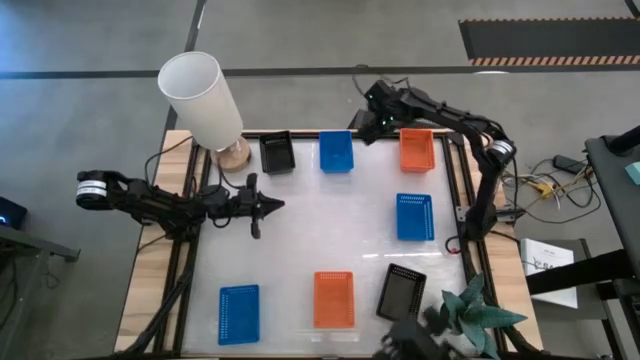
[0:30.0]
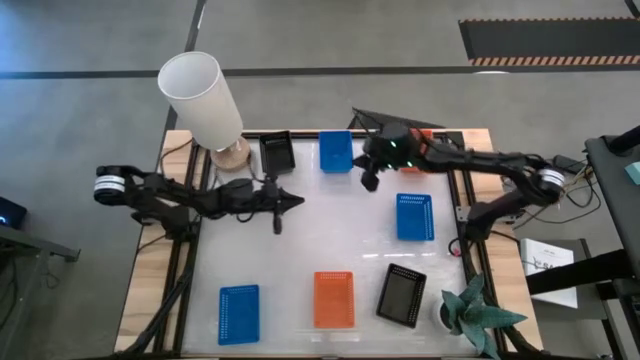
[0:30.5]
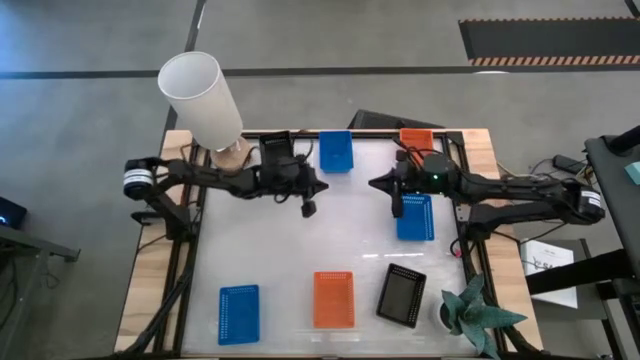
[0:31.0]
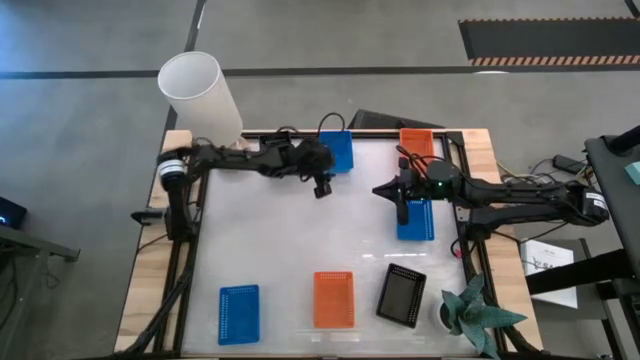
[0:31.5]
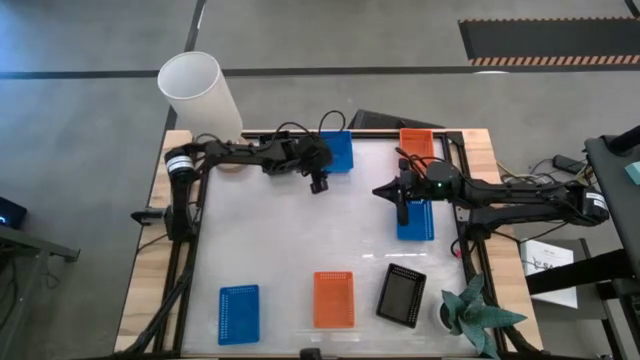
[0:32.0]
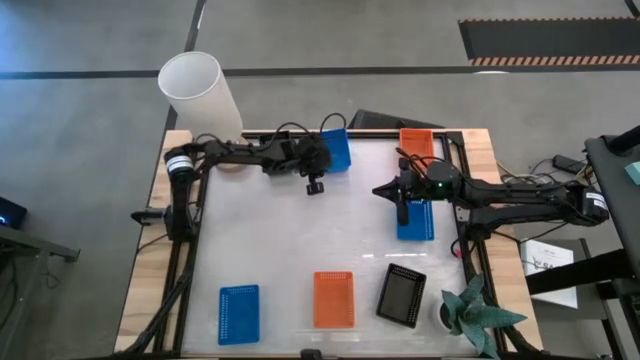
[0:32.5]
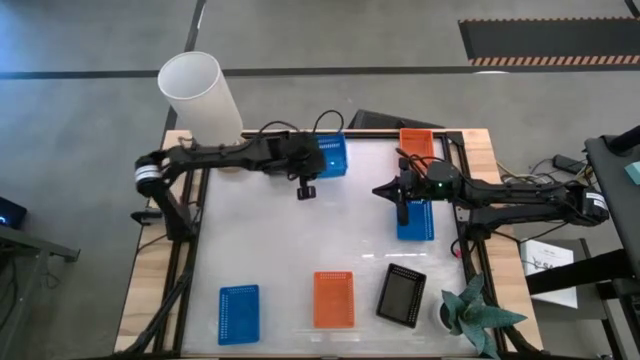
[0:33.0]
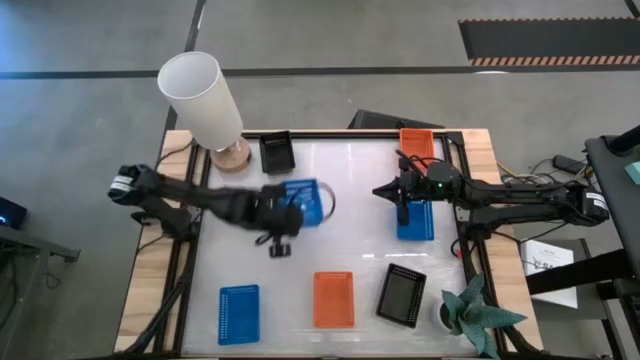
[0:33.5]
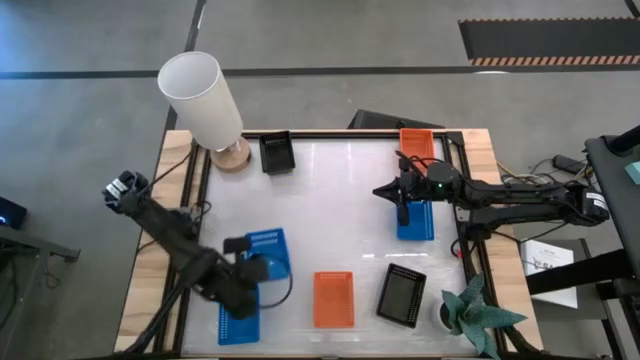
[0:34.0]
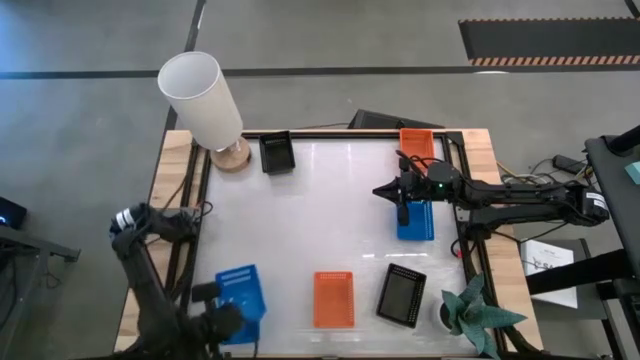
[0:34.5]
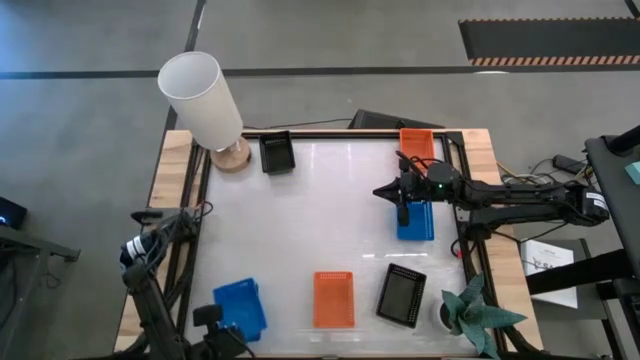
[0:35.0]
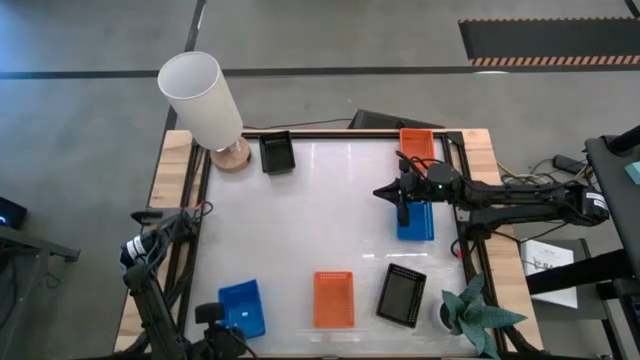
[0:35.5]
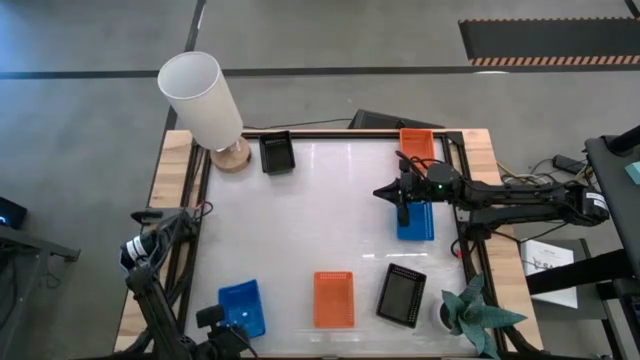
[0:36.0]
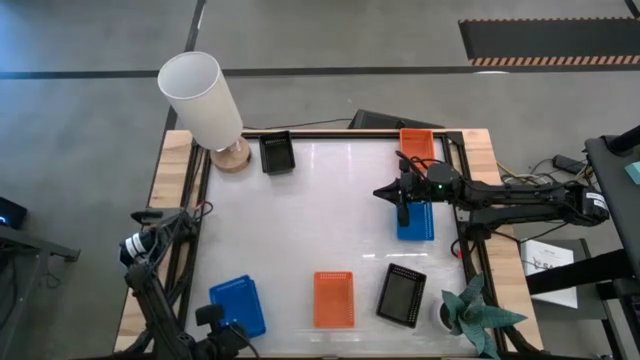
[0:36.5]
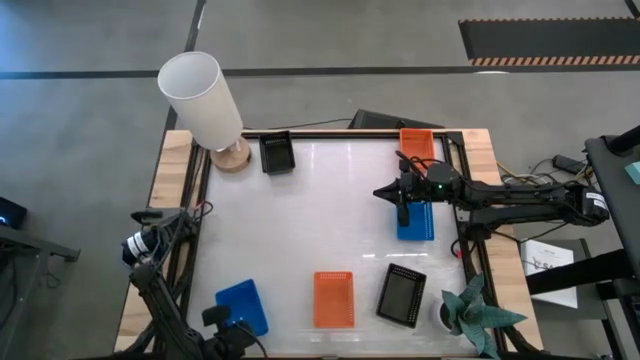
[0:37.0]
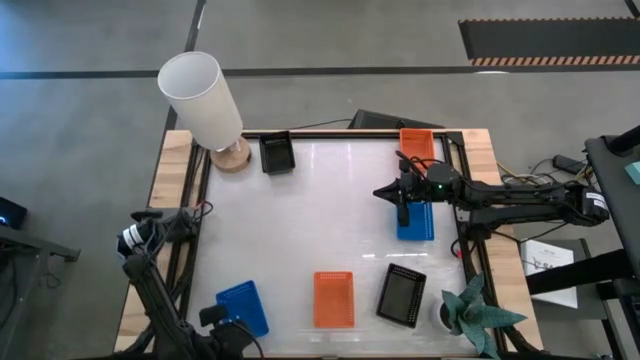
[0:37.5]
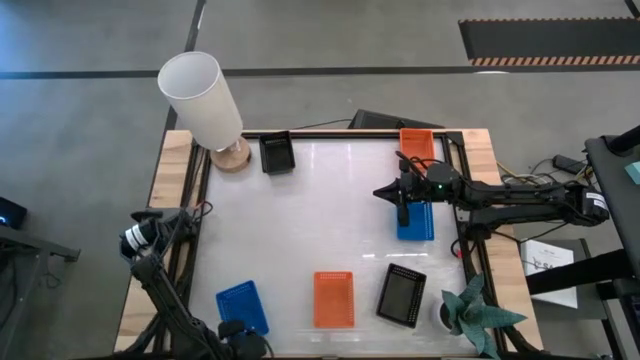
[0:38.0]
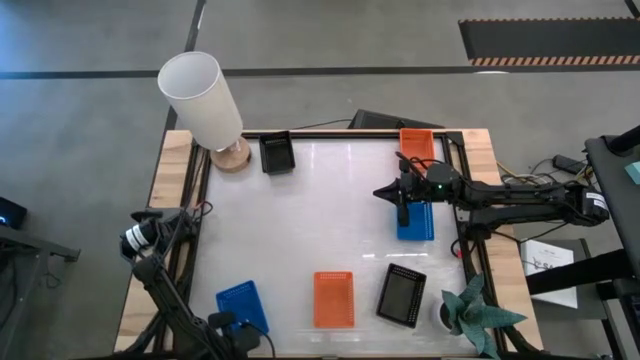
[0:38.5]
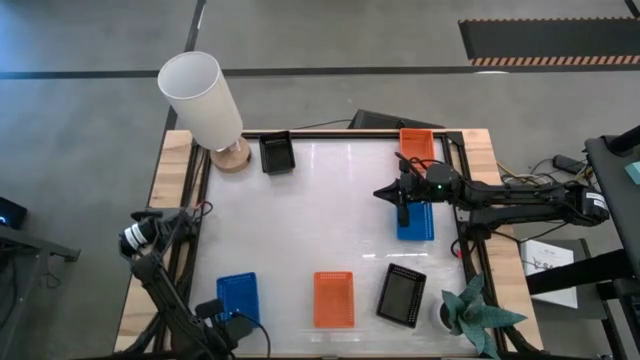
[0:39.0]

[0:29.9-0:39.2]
Stack the top blue bin on top of the bottom left blue bin

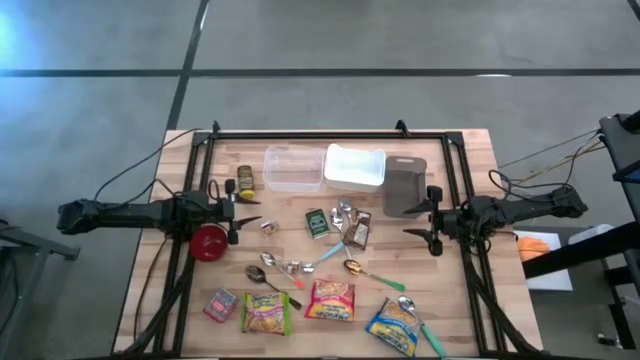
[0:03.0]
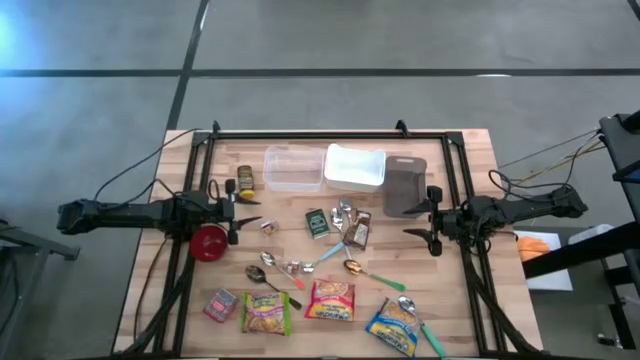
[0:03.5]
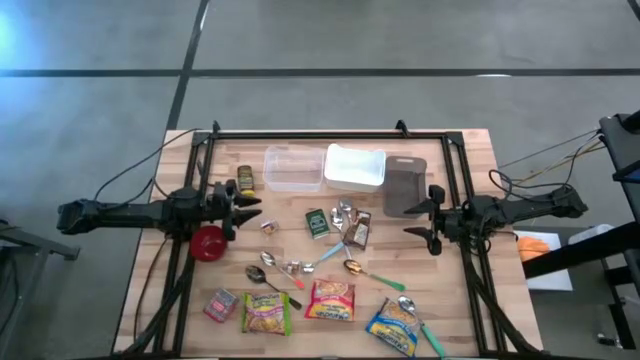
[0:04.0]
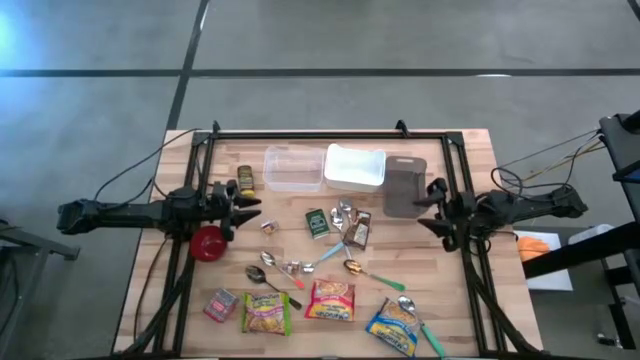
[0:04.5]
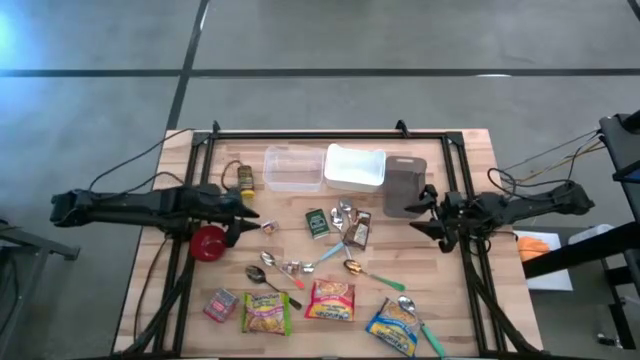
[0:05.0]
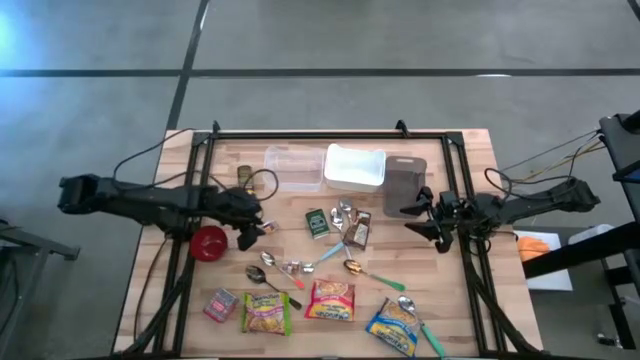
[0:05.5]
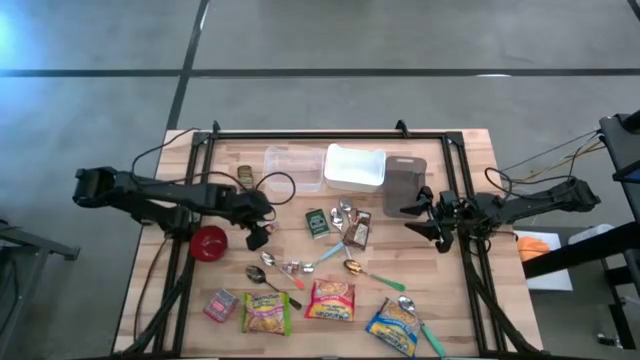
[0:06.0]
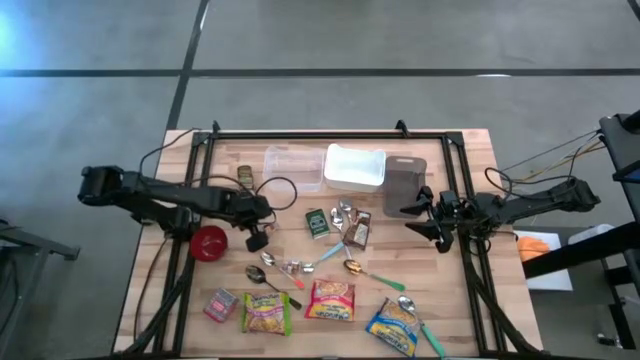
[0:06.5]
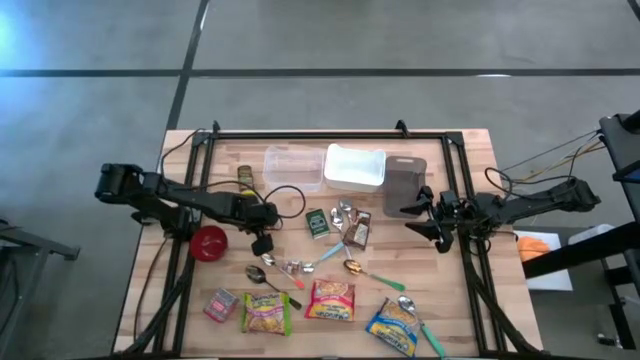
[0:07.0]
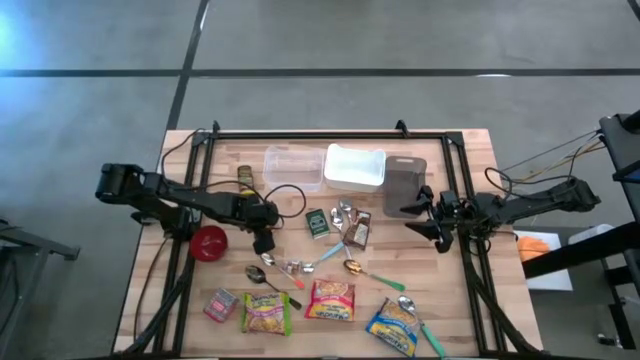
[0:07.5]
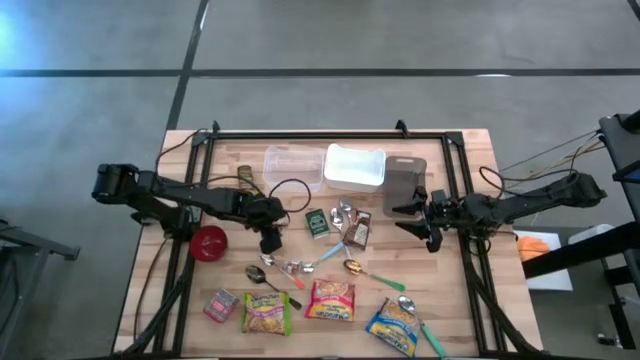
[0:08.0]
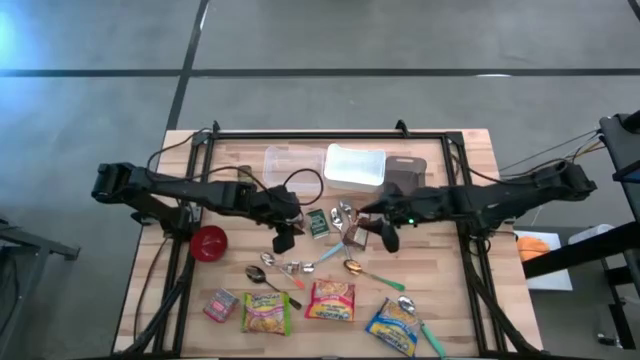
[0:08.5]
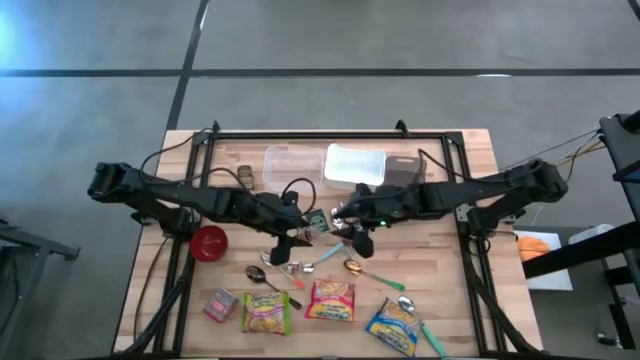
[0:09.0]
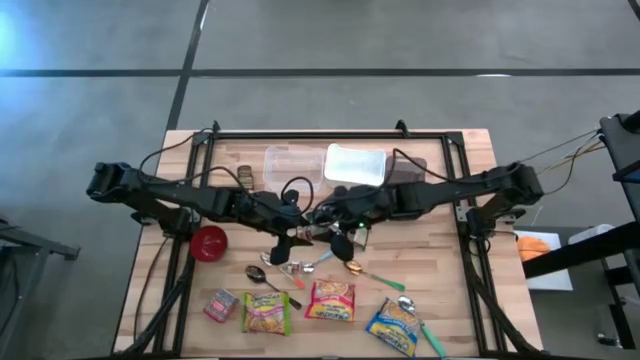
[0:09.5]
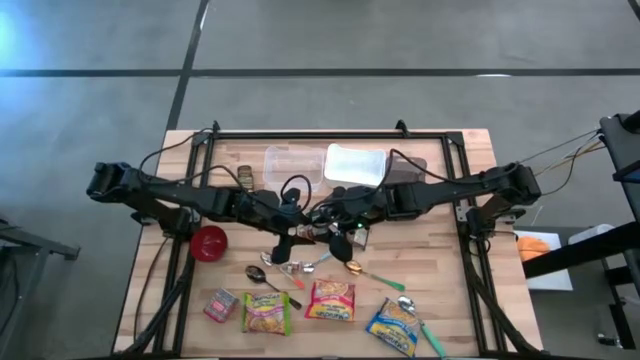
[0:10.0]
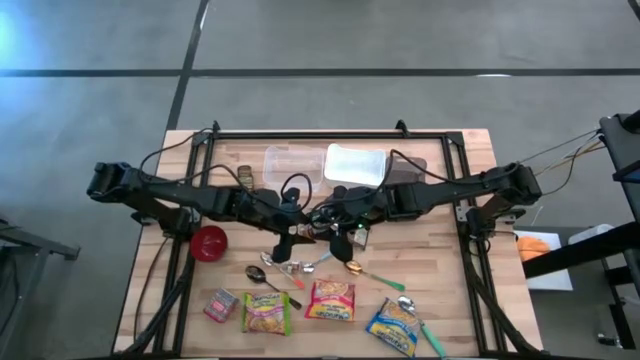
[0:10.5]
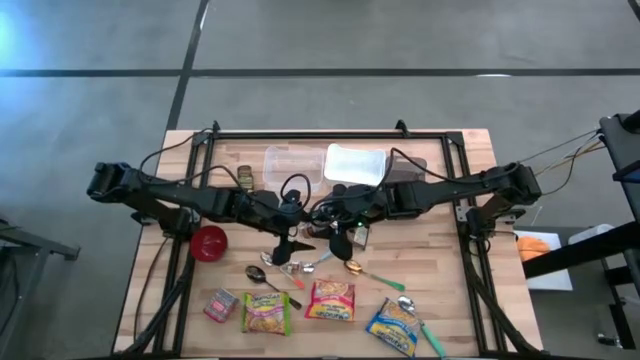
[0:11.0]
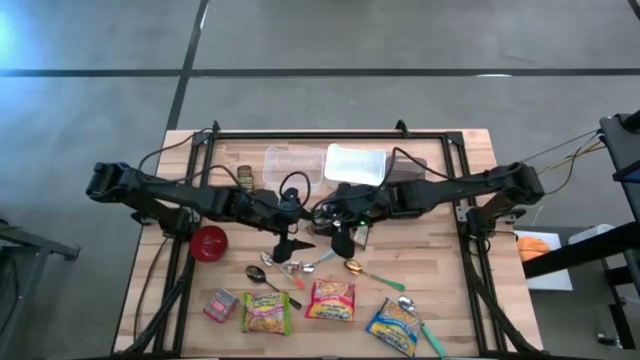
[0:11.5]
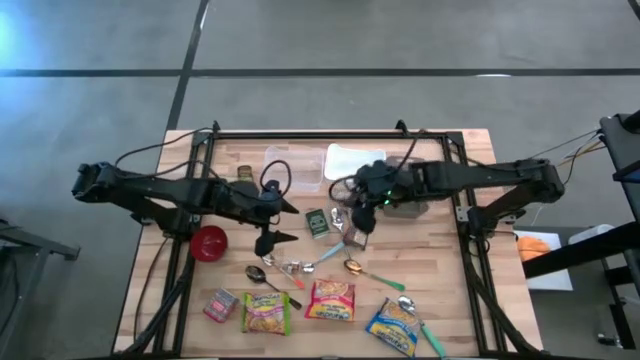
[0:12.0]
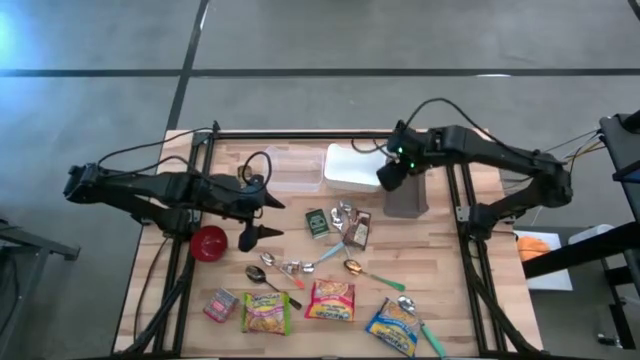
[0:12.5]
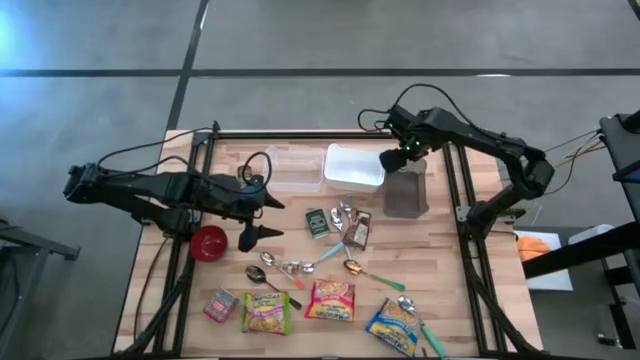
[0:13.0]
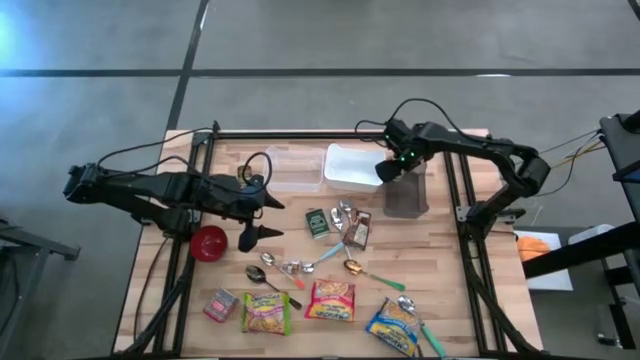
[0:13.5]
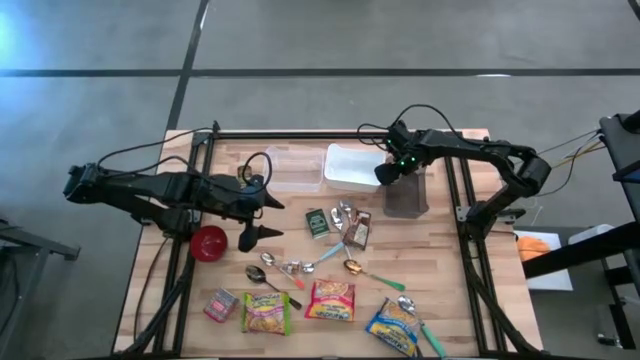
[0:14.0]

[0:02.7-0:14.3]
Put the top brown seasoning bottle into the black bin
